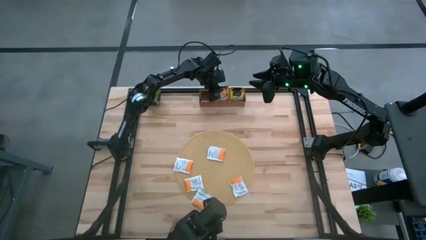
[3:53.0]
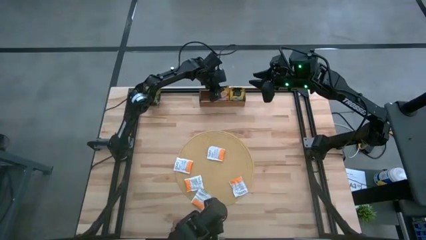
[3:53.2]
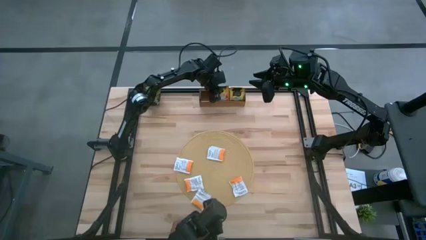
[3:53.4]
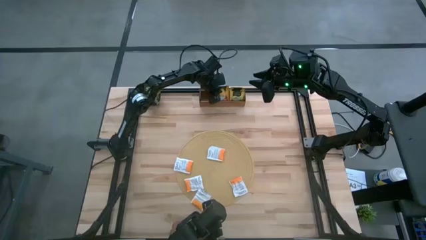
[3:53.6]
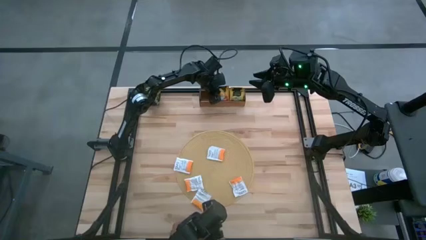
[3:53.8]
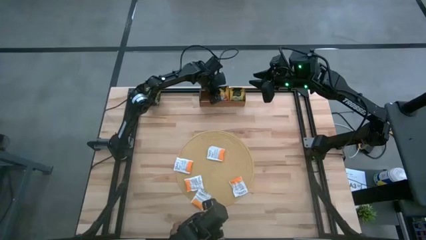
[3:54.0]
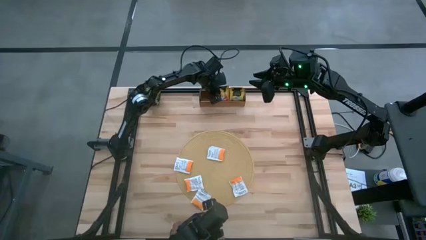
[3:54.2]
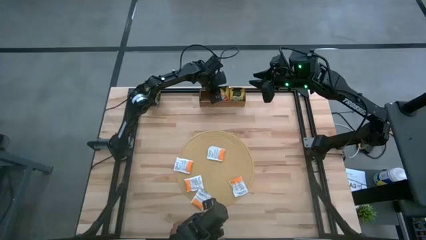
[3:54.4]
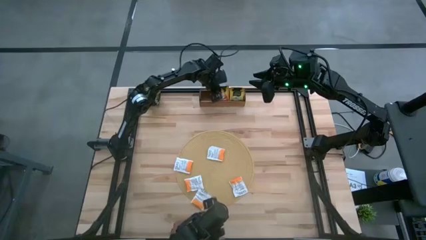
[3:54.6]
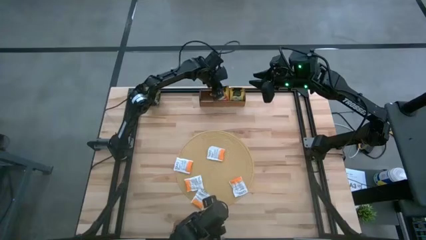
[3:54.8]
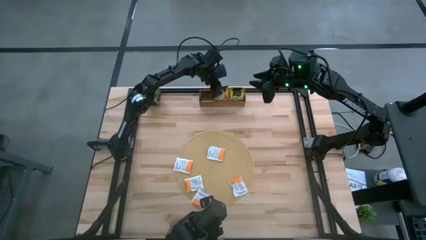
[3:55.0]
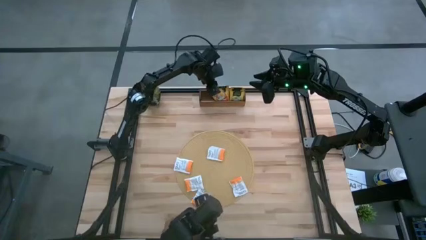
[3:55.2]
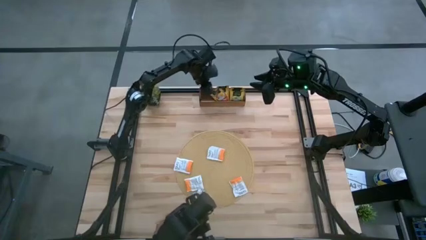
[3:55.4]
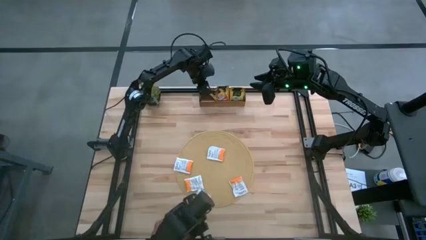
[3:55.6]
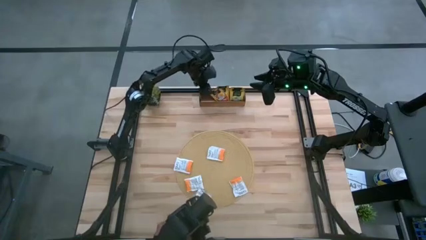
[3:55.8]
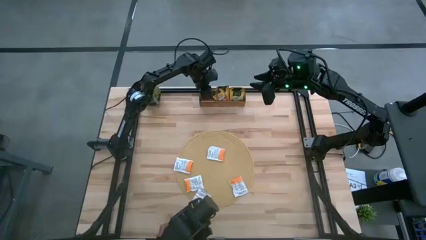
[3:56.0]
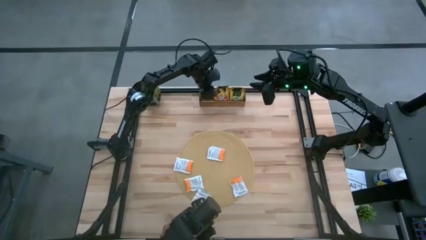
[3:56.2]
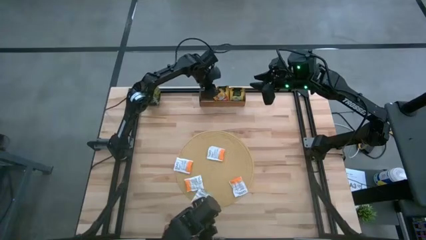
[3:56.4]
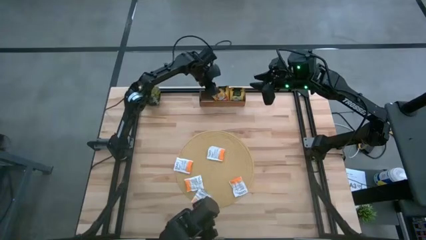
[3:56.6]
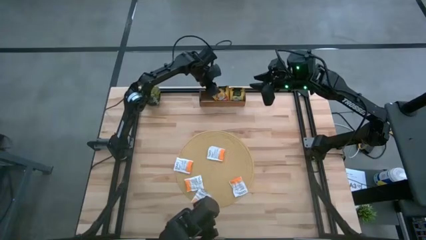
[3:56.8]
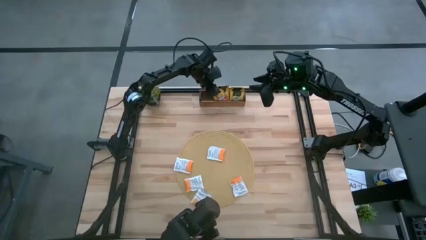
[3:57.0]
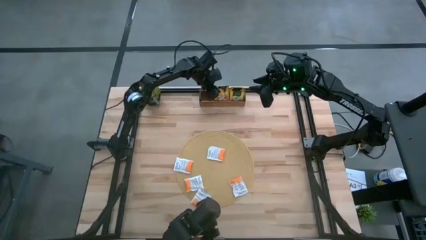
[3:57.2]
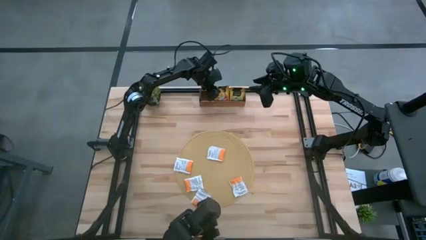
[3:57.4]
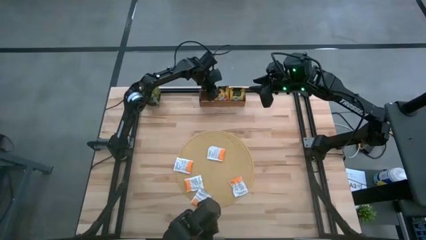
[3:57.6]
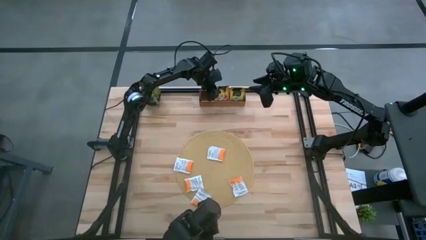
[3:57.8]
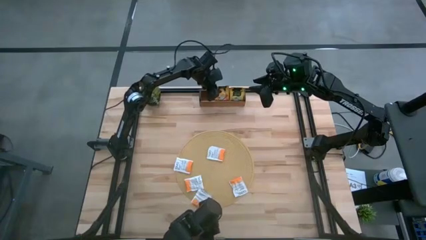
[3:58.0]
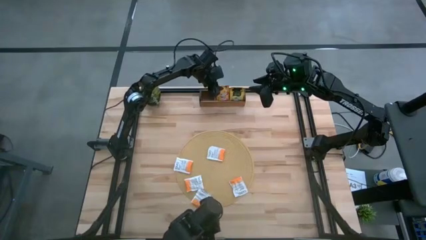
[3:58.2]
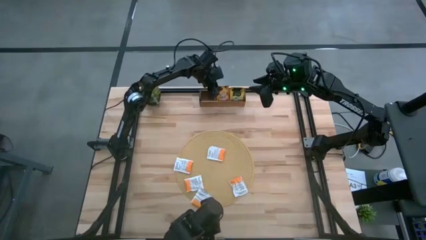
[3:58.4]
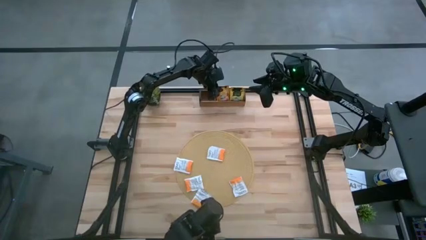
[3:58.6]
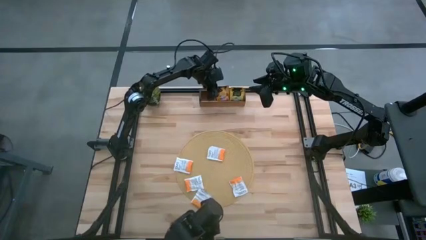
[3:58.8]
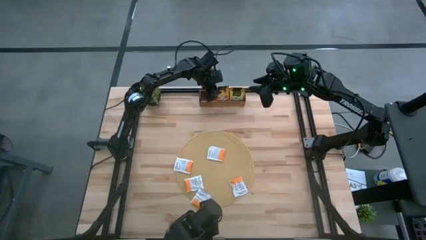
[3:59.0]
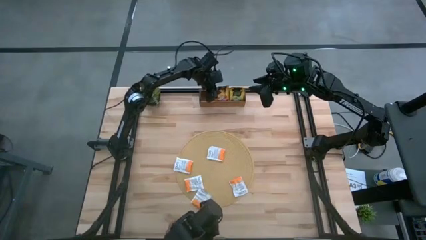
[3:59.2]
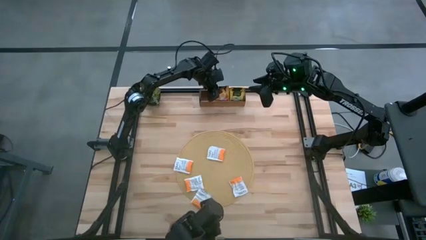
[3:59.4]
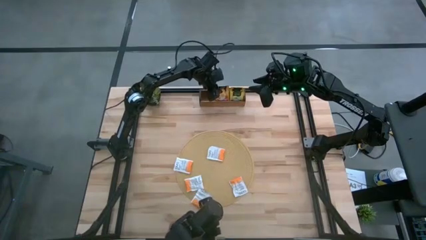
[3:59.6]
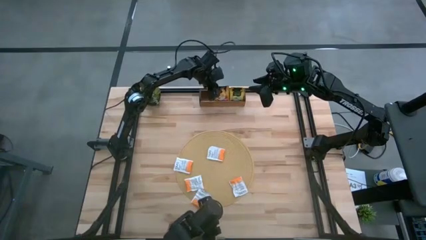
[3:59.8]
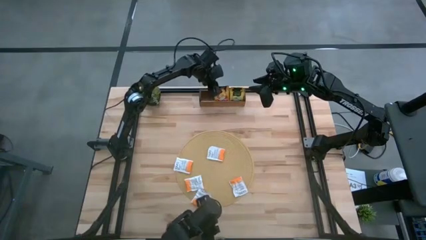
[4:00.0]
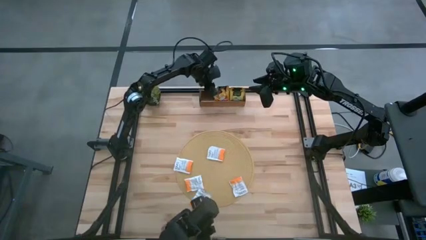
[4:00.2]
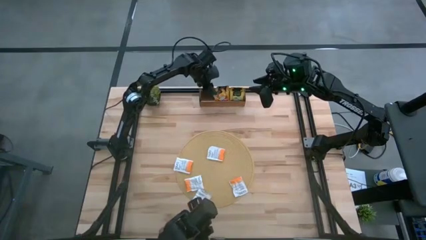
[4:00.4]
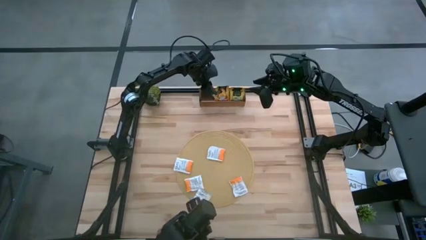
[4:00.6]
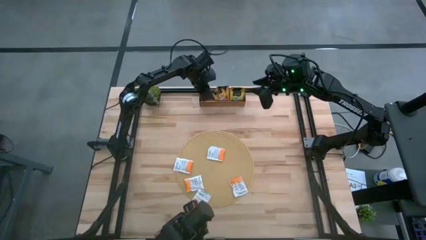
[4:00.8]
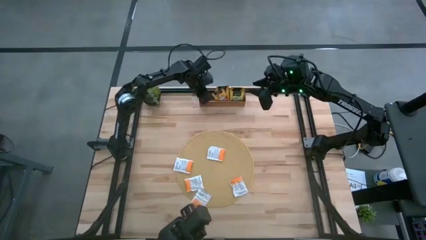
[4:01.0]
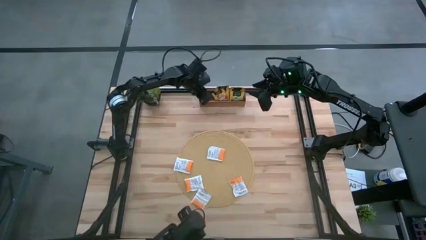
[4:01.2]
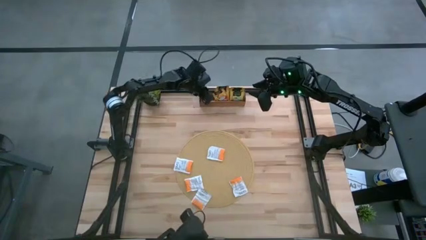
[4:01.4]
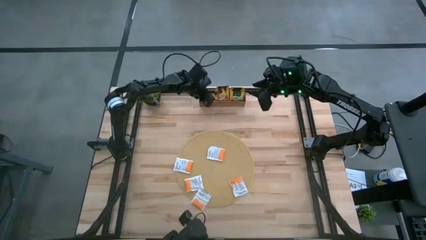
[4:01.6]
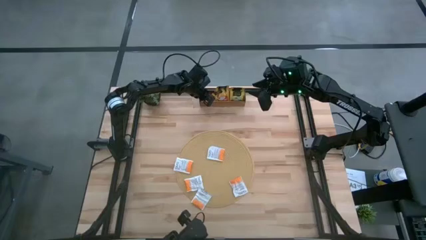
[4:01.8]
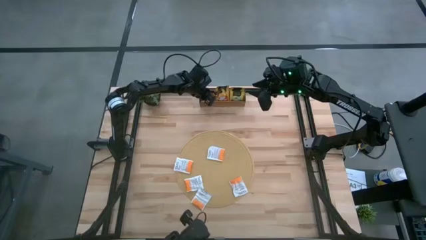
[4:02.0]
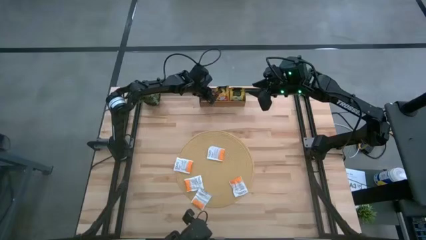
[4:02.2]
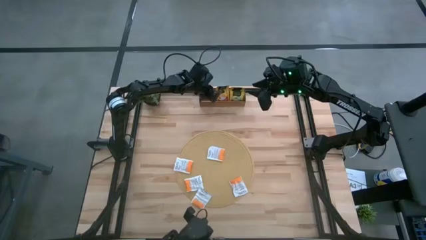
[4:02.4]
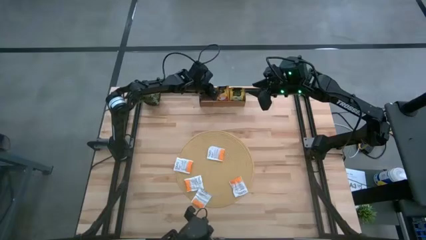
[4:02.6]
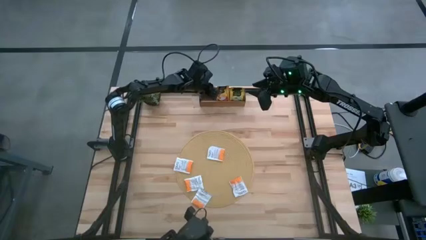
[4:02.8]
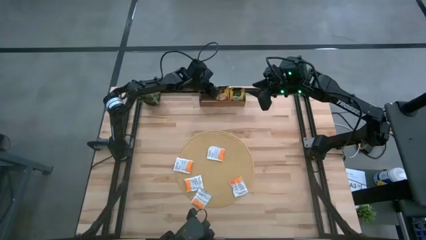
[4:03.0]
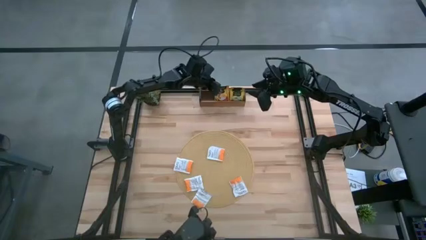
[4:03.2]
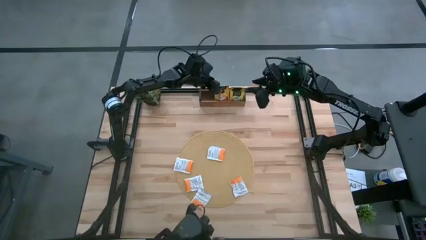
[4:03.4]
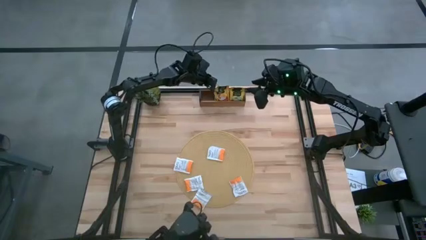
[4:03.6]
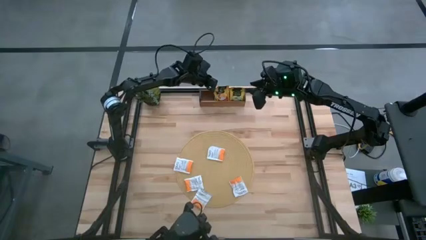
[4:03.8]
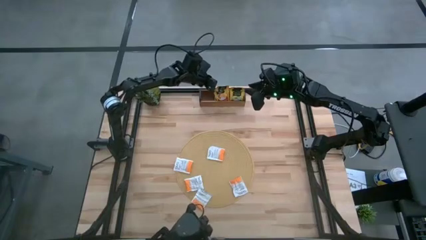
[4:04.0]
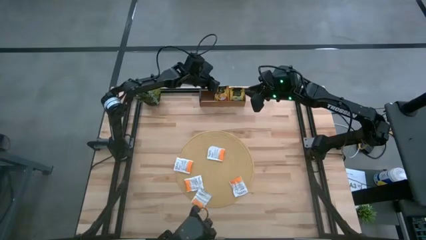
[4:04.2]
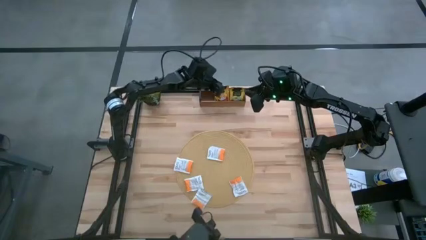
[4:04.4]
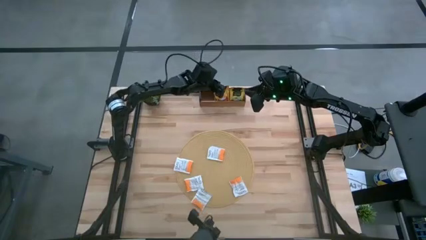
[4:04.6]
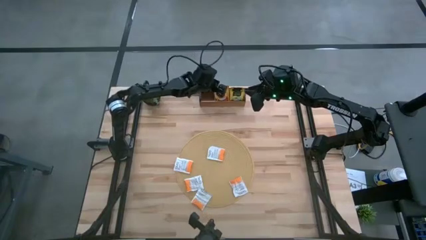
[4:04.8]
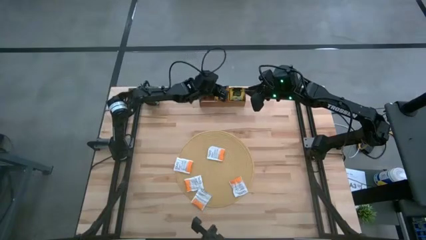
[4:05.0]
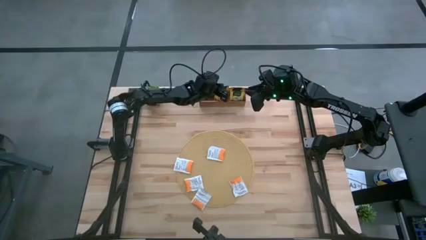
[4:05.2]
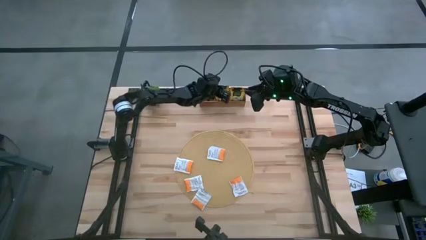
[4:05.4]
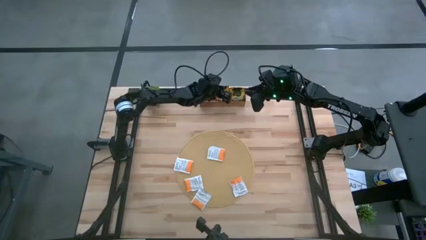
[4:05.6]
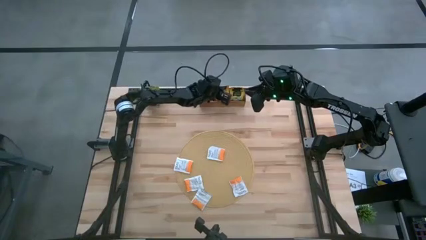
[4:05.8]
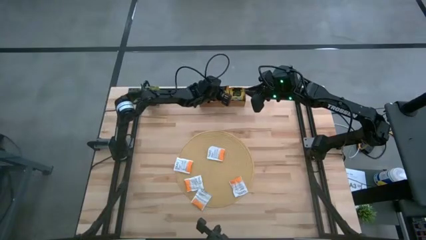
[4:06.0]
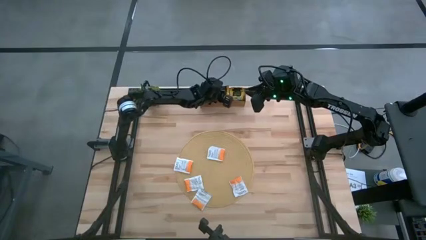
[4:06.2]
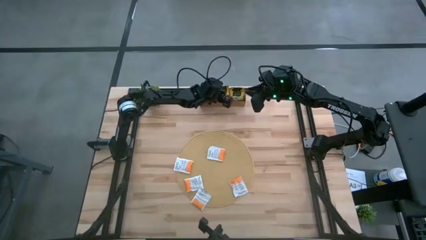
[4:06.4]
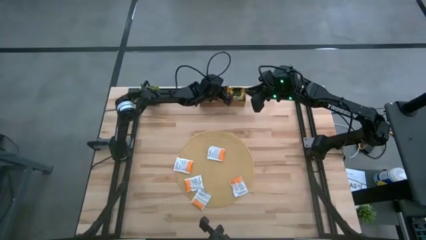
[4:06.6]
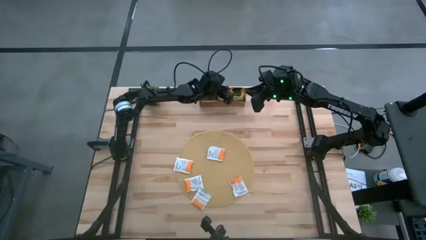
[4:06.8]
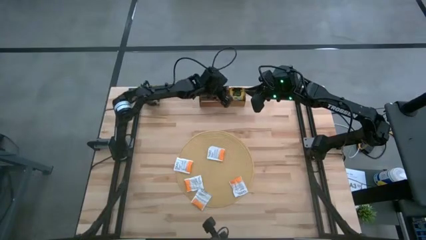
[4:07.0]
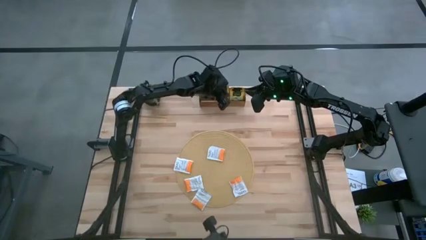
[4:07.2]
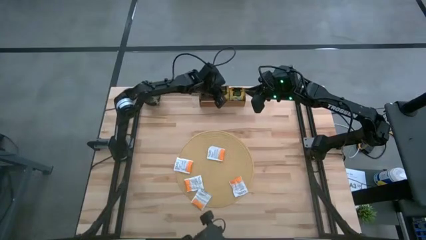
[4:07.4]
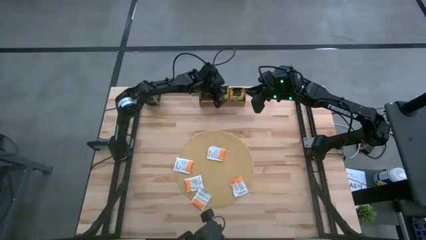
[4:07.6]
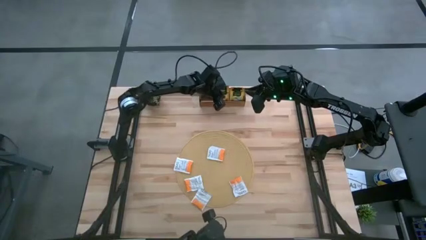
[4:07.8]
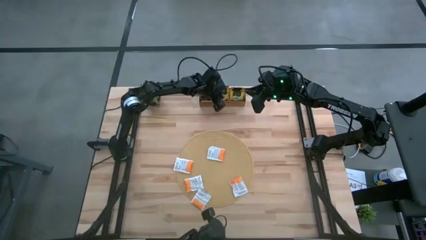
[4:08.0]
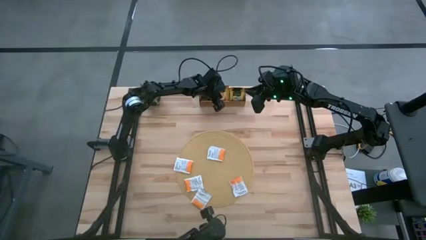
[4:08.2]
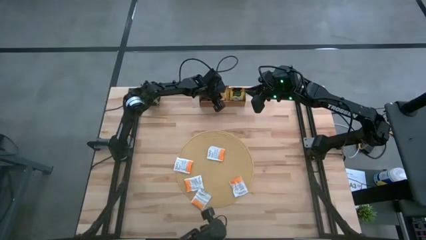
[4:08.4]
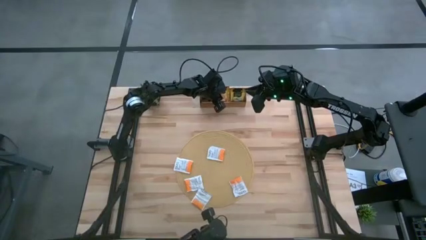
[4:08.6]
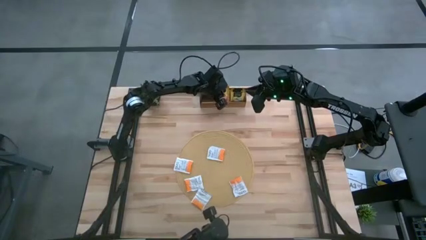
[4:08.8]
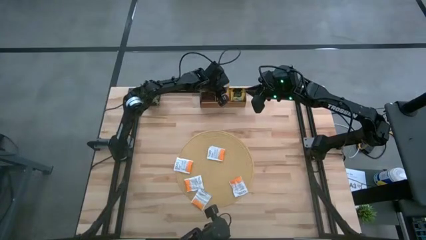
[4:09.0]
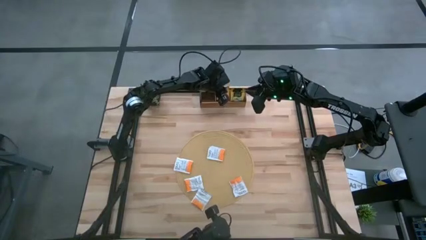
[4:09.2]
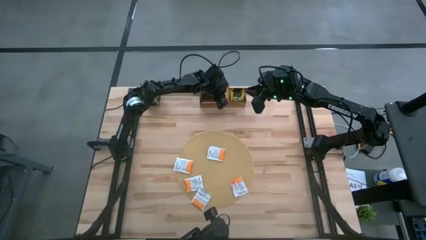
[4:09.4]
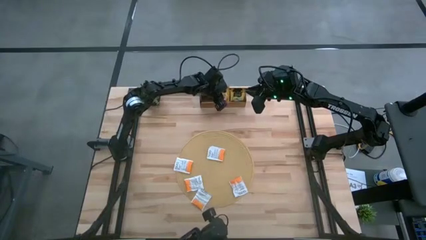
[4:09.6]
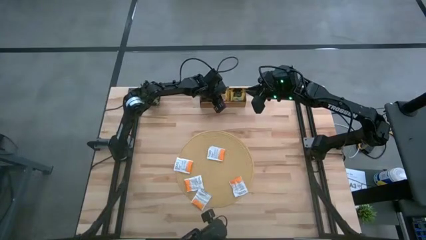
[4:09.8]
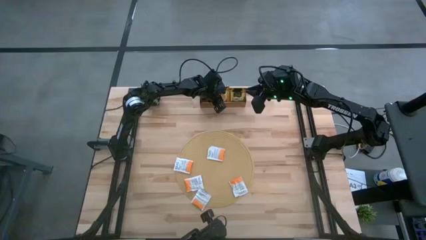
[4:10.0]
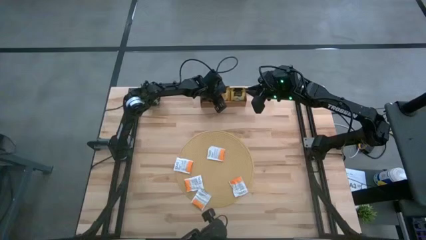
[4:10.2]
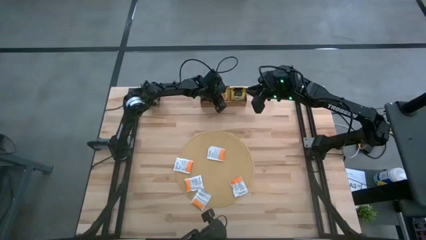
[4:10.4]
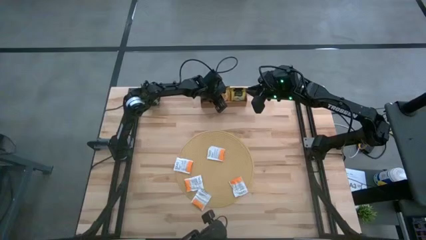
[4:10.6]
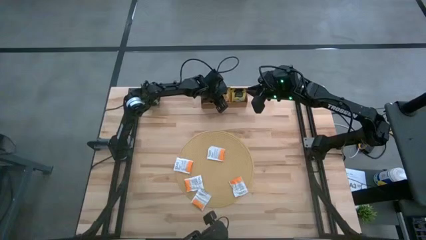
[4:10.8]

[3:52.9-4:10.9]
Task: Pick & Place Tea
Put the red tea bag into the middle section of the wooden organizer
